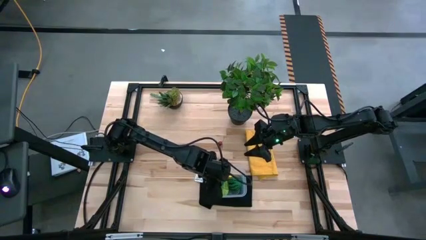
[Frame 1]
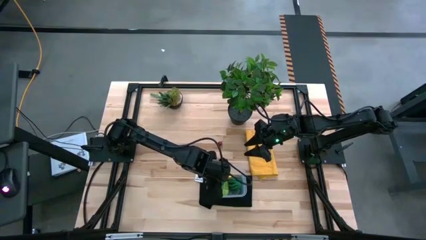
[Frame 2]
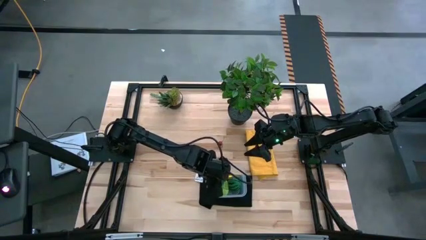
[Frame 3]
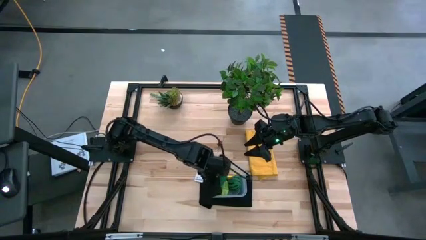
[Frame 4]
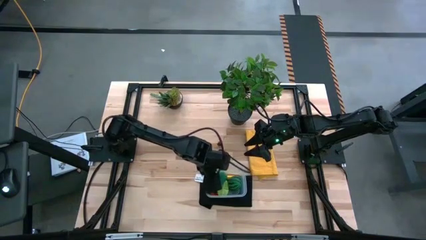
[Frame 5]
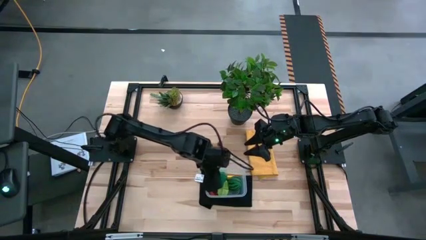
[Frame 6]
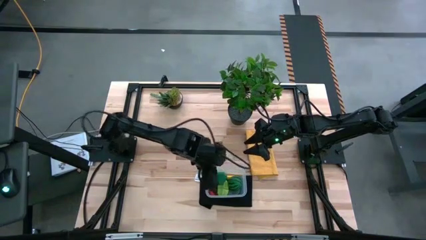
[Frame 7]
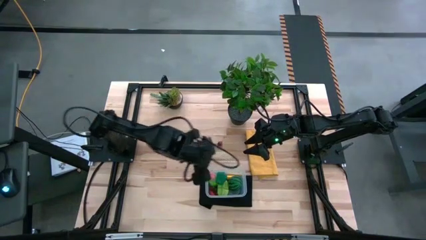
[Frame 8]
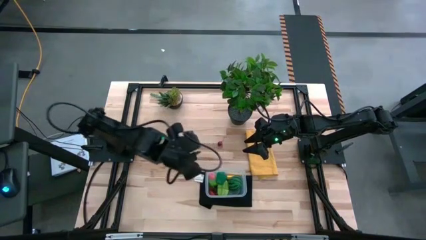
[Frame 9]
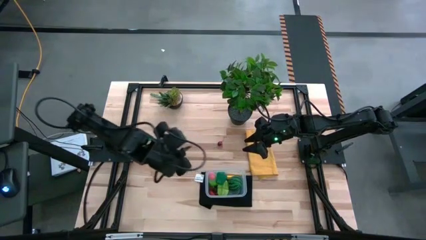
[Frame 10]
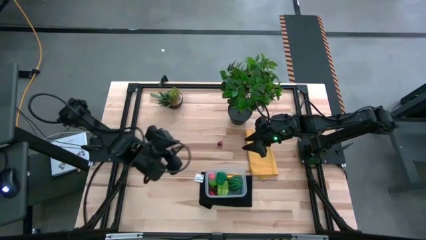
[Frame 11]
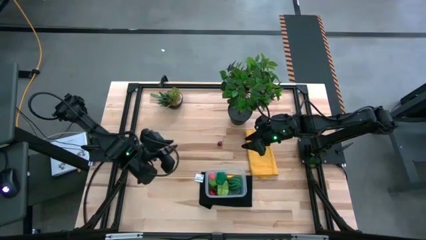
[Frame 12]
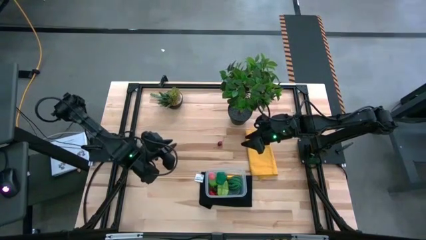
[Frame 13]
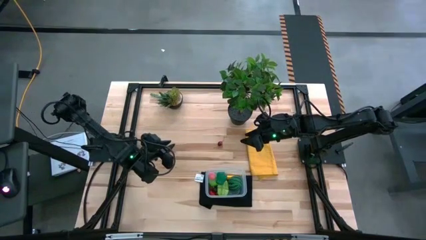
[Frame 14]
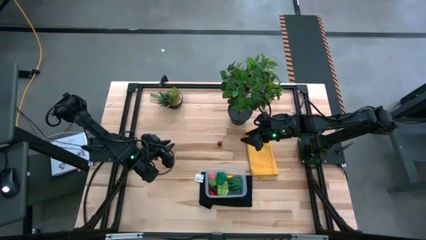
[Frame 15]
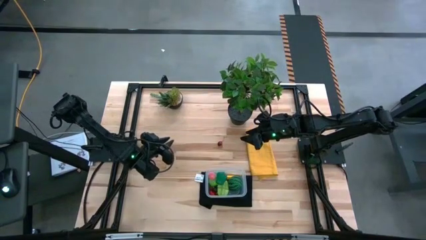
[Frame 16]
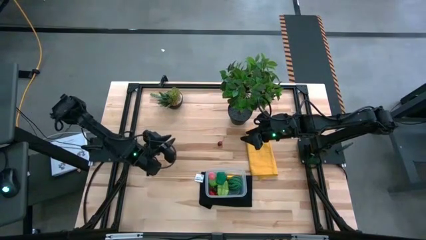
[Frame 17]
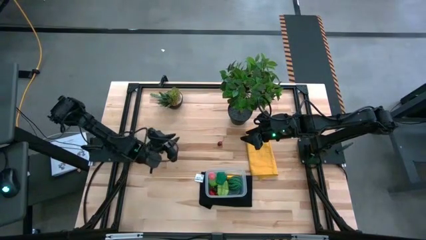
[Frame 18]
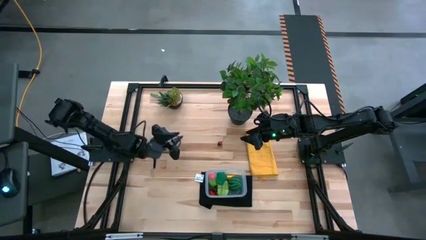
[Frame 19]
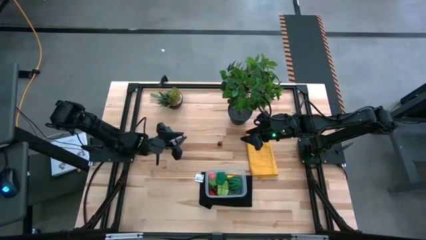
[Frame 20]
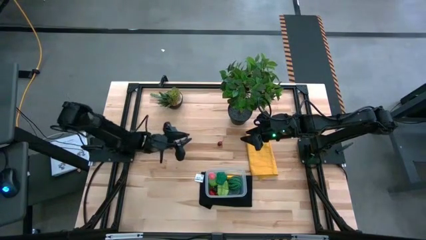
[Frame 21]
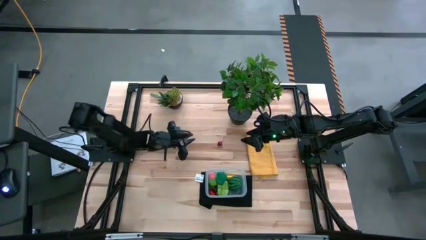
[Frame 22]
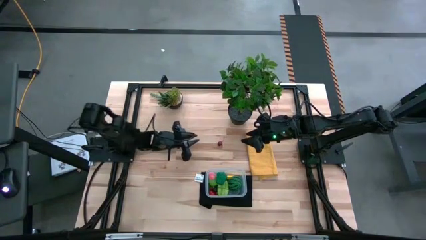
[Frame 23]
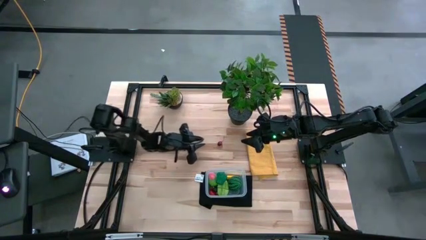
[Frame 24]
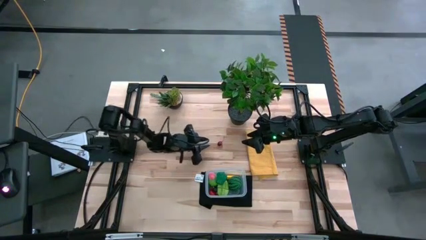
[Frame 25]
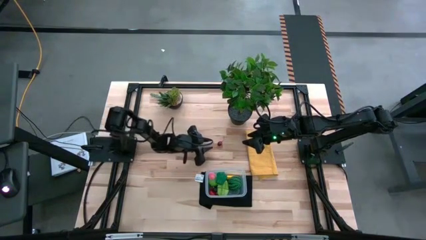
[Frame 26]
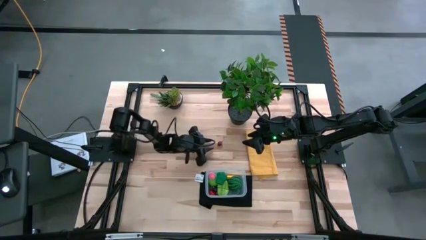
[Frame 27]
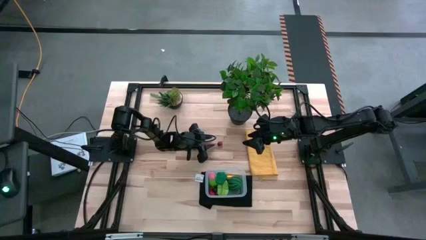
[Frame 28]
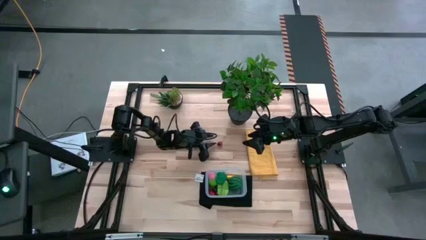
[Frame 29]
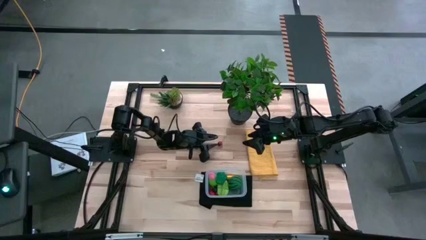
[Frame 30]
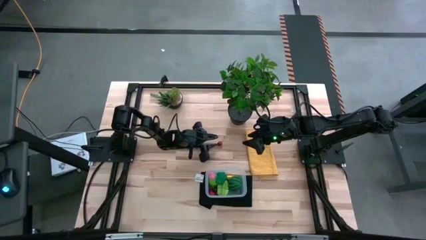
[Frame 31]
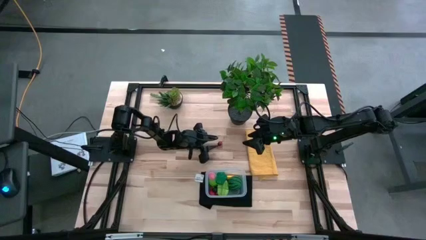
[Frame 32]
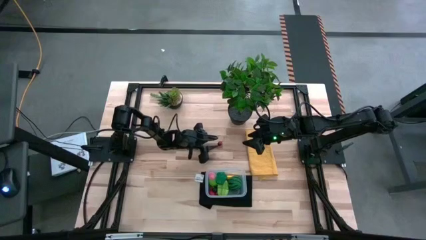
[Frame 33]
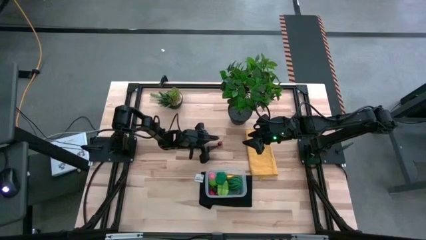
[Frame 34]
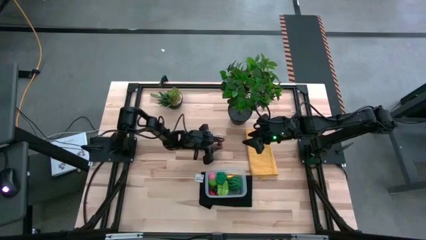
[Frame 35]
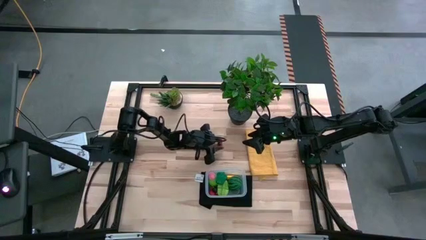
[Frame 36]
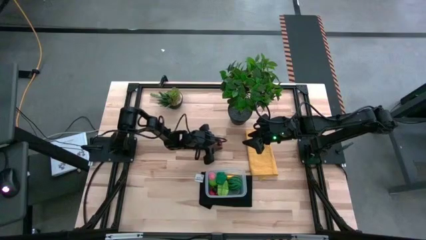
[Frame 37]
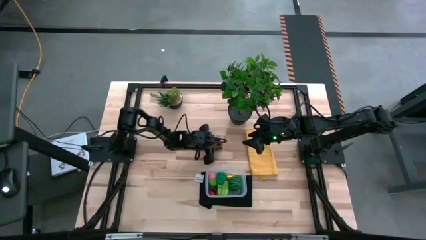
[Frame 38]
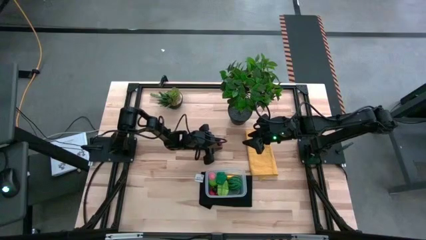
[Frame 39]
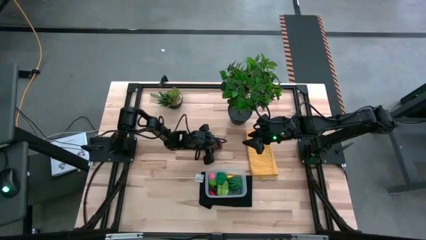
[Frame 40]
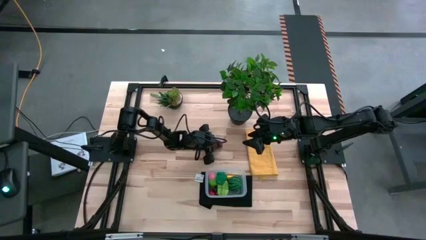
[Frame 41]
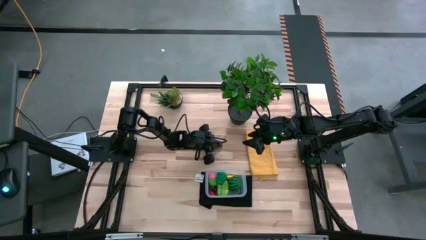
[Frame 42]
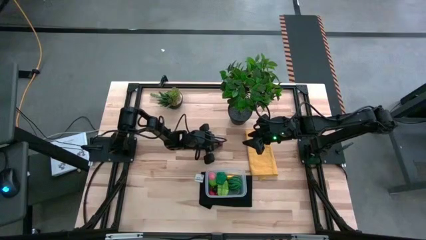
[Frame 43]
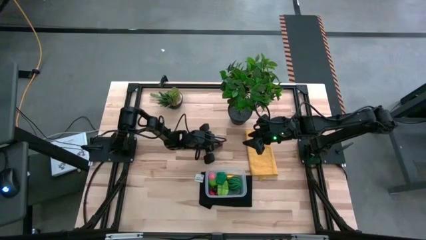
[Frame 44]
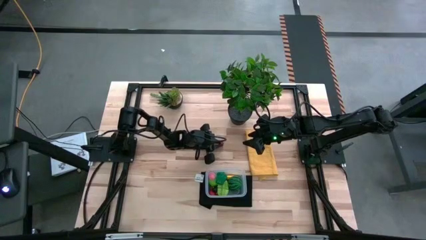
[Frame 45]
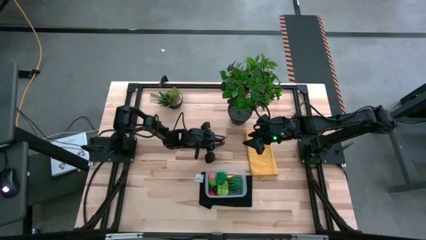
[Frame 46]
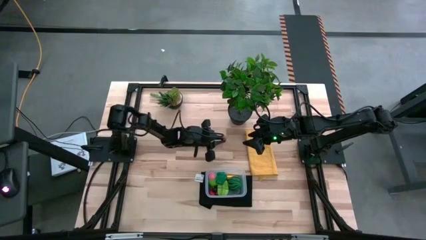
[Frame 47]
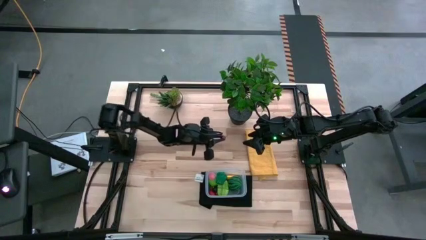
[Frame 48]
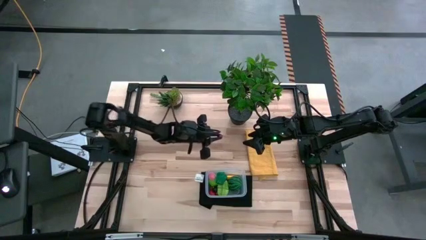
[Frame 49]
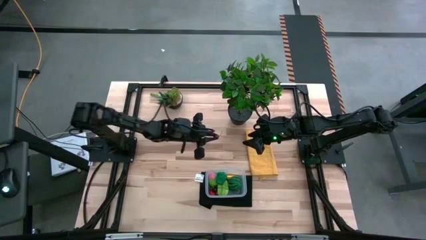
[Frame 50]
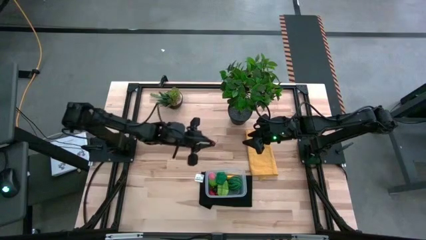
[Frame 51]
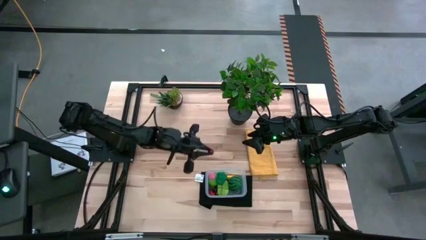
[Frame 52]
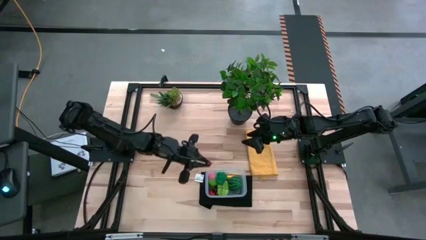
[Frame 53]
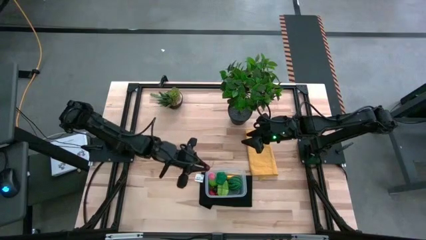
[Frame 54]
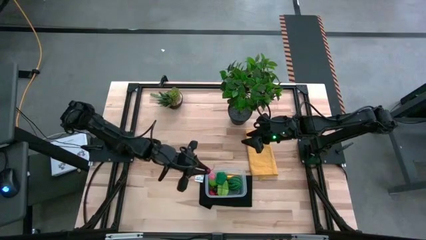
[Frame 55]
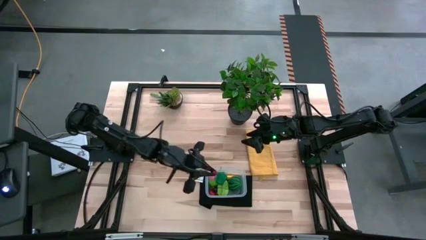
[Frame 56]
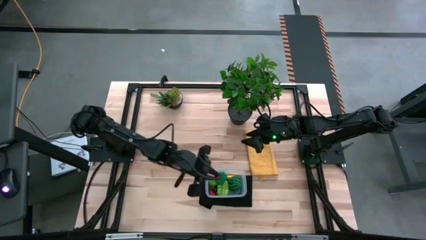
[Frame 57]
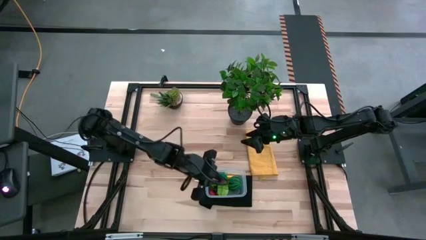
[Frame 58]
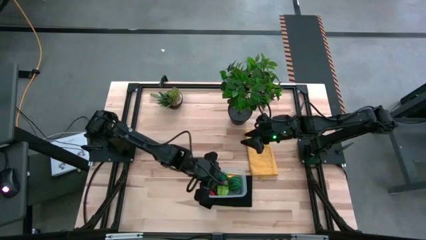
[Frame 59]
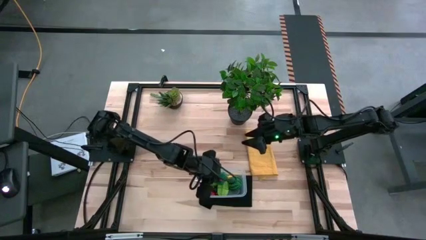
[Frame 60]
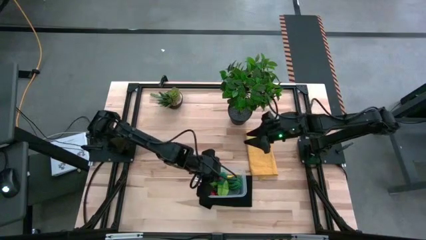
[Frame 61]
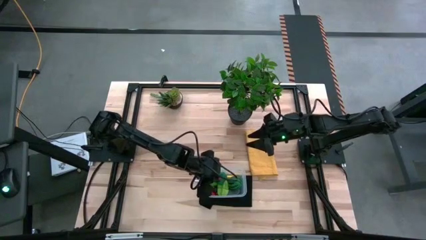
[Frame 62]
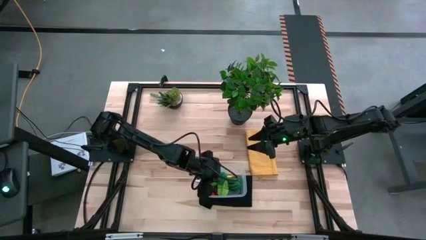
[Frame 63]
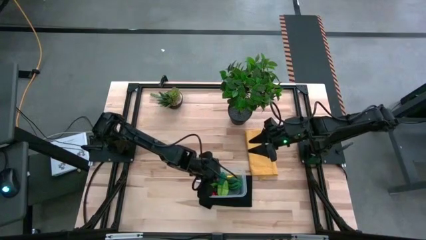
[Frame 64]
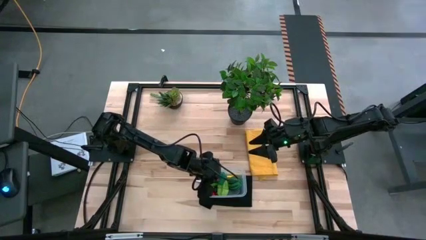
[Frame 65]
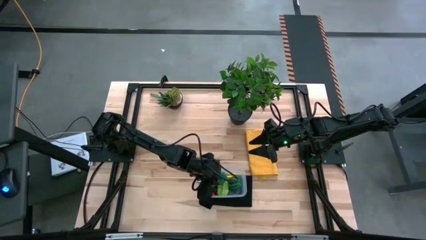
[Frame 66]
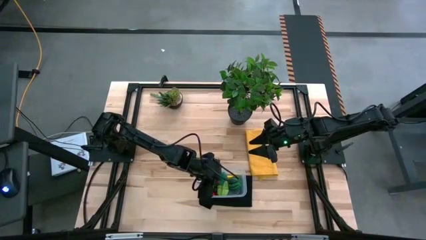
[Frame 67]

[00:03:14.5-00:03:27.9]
Task: Pick and placing Produce into tupperware
Put the red cherry into the transparent bin

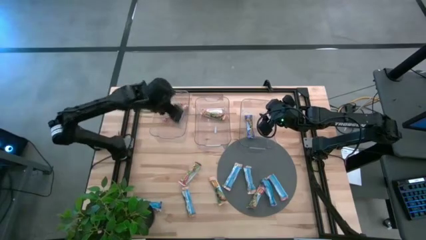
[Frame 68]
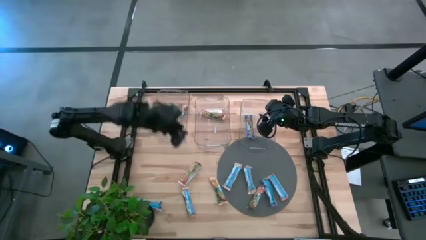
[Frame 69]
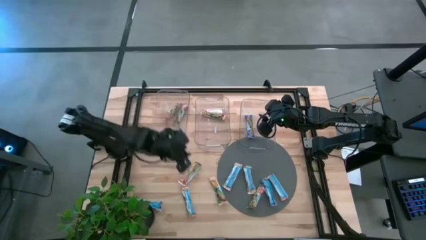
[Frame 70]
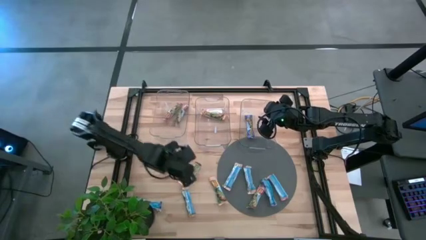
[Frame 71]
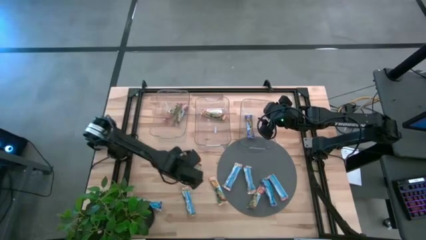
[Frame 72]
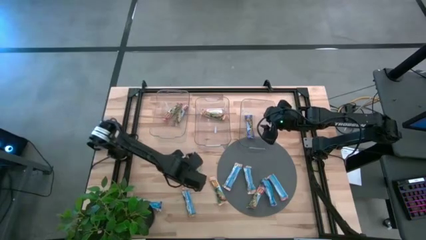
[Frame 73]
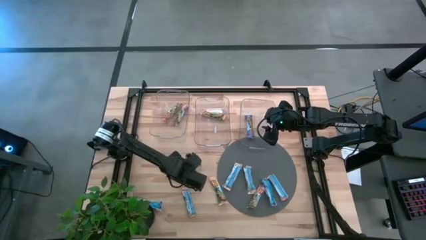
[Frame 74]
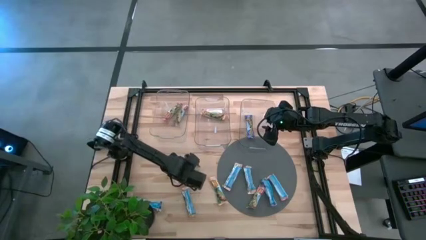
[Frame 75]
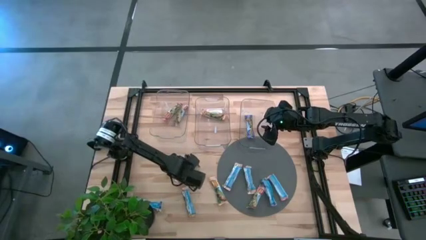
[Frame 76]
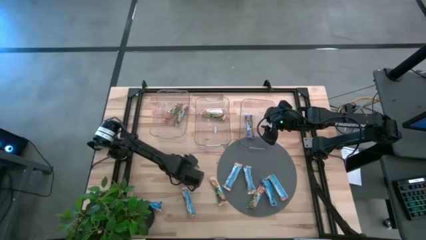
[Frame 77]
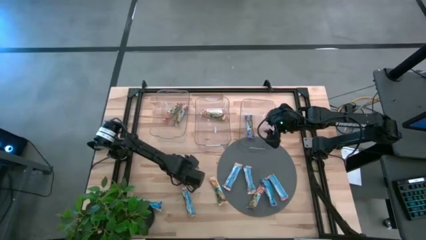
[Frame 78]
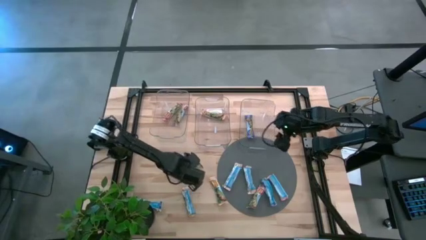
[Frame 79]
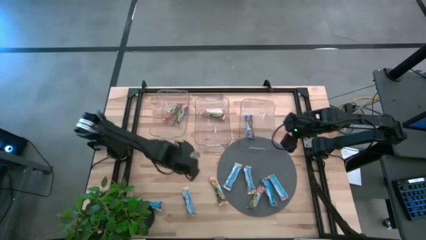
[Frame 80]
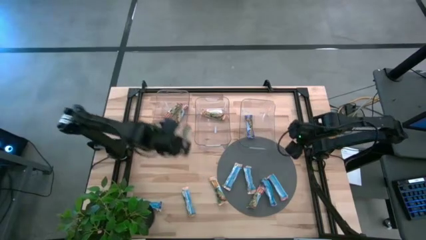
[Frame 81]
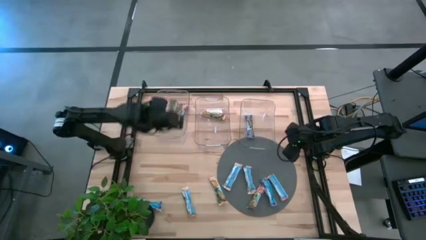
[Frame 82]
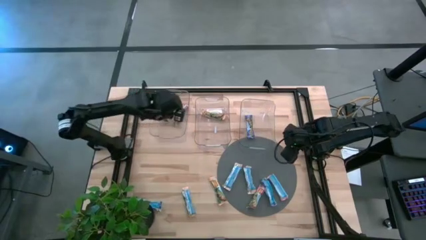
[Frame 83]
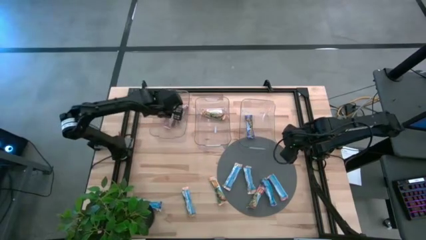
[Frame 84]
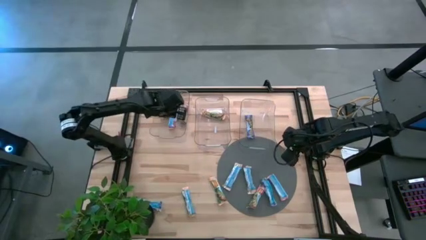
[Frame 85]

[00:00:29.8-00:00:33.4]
Task: Pick and place Granola Bars by type
Put the red snack bar into the left transparent bin
